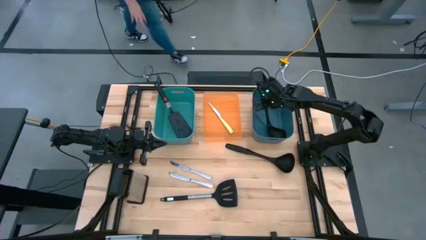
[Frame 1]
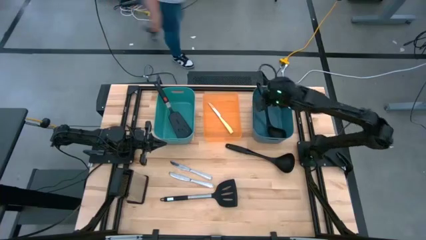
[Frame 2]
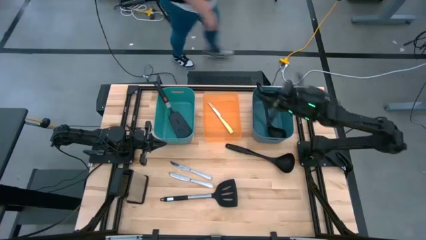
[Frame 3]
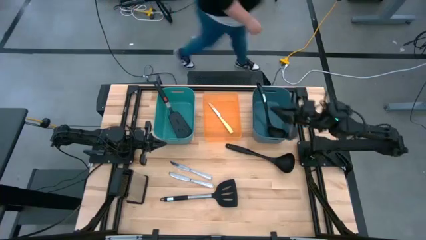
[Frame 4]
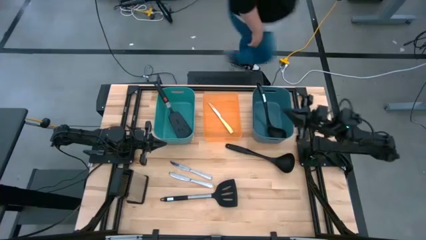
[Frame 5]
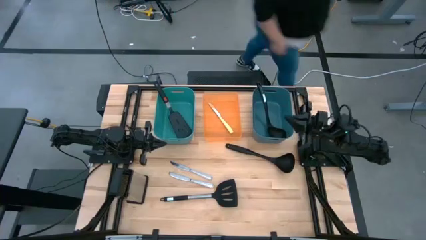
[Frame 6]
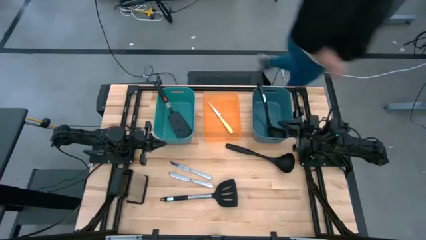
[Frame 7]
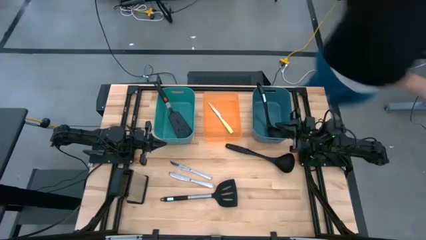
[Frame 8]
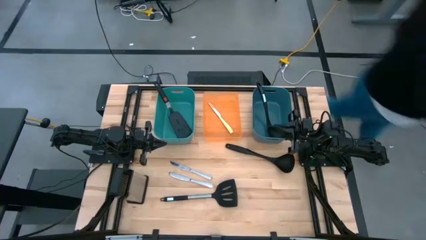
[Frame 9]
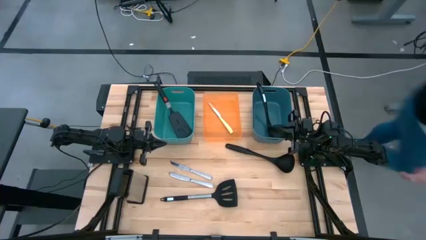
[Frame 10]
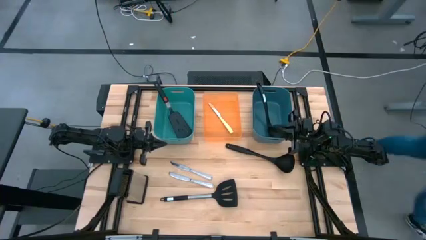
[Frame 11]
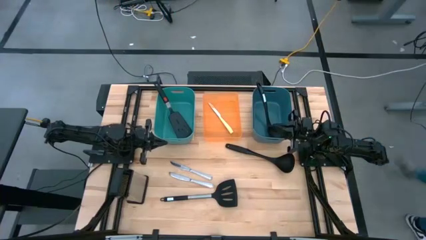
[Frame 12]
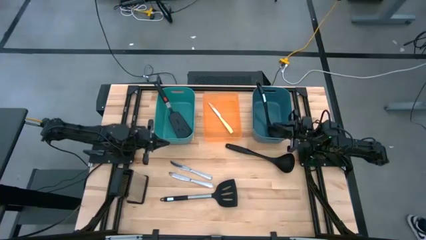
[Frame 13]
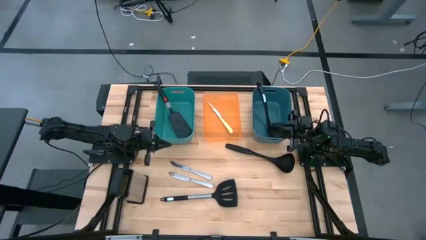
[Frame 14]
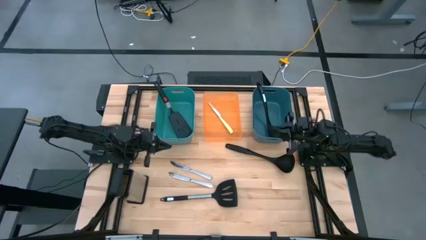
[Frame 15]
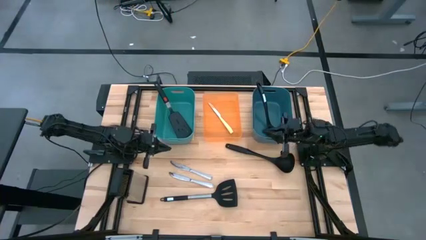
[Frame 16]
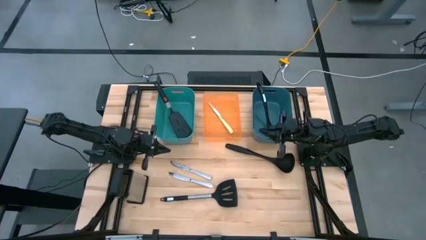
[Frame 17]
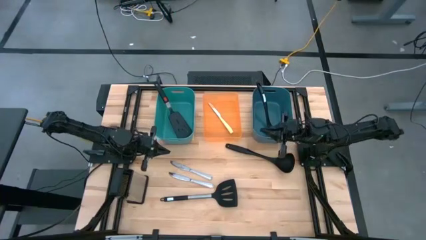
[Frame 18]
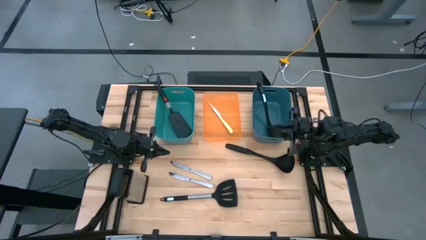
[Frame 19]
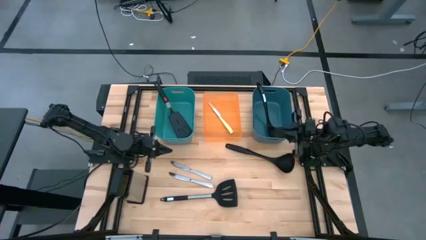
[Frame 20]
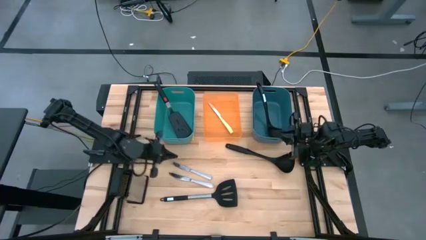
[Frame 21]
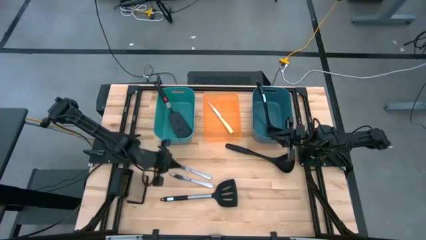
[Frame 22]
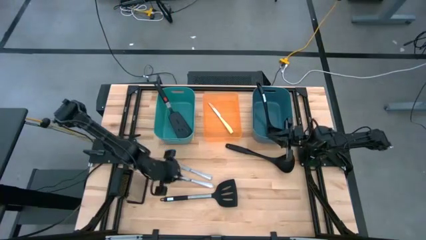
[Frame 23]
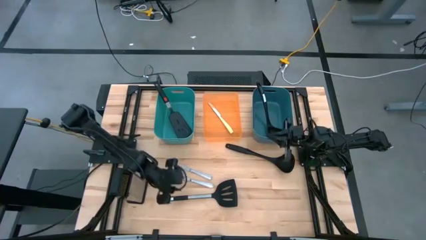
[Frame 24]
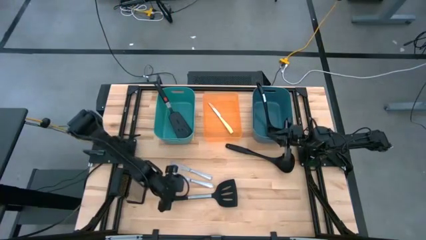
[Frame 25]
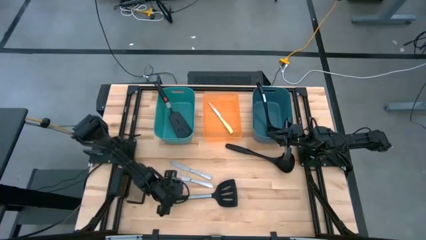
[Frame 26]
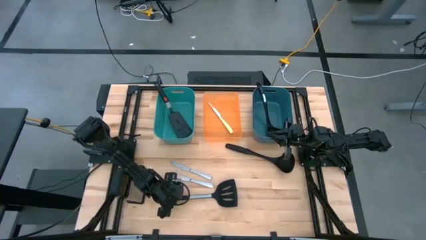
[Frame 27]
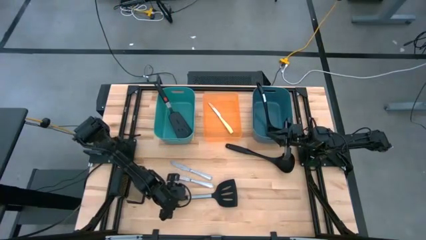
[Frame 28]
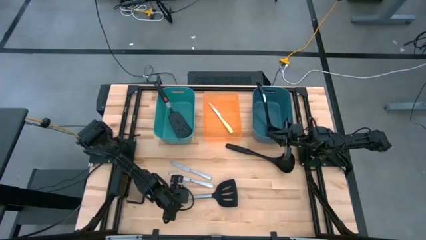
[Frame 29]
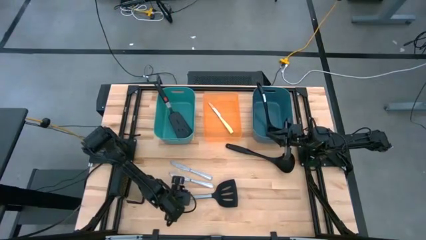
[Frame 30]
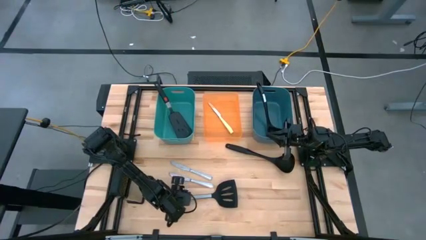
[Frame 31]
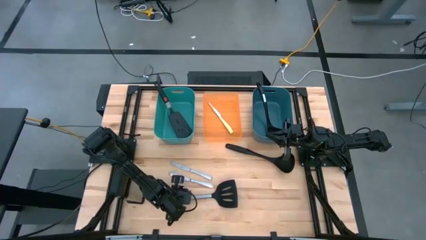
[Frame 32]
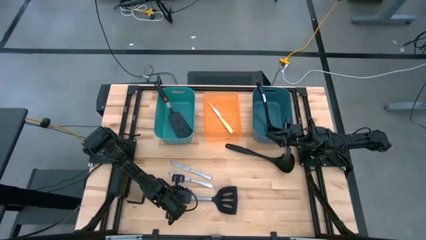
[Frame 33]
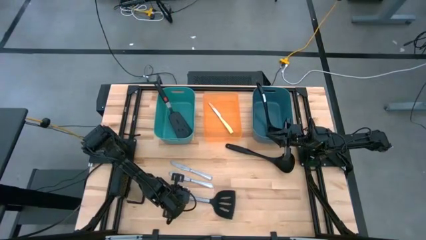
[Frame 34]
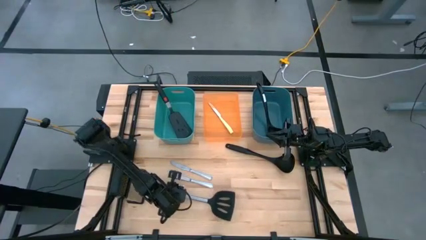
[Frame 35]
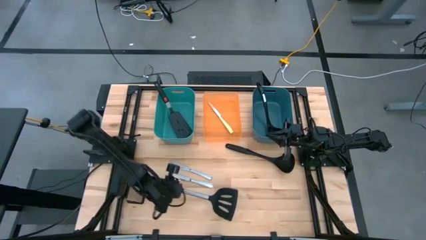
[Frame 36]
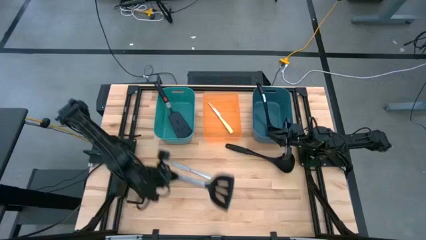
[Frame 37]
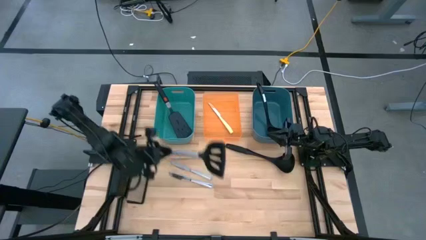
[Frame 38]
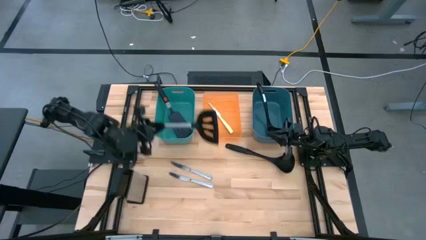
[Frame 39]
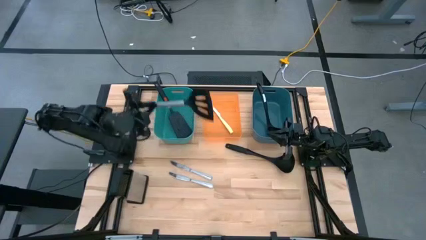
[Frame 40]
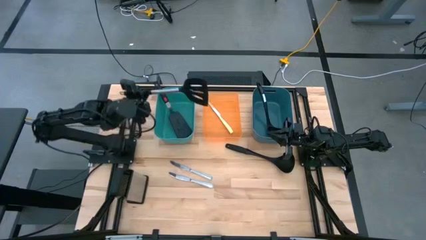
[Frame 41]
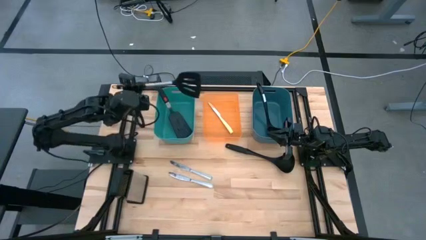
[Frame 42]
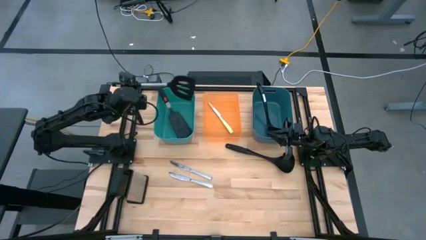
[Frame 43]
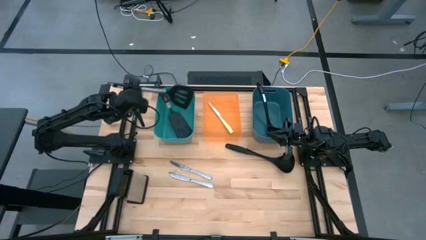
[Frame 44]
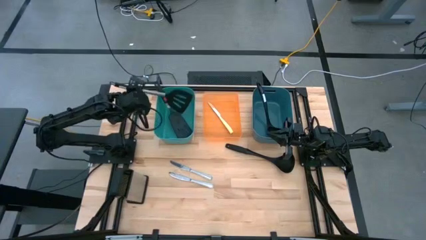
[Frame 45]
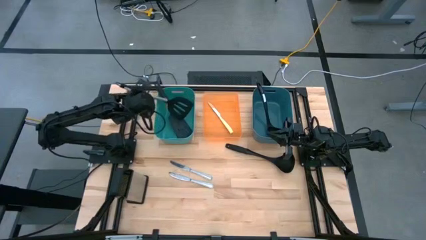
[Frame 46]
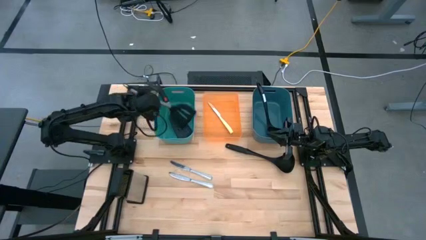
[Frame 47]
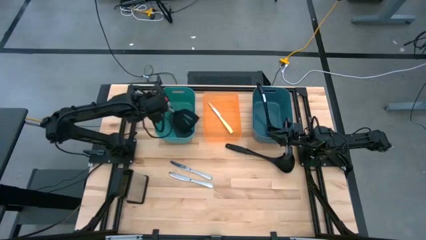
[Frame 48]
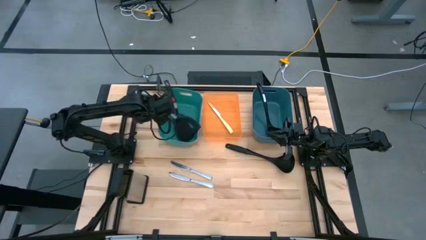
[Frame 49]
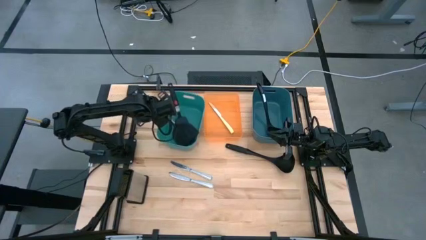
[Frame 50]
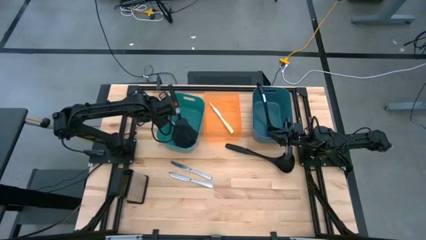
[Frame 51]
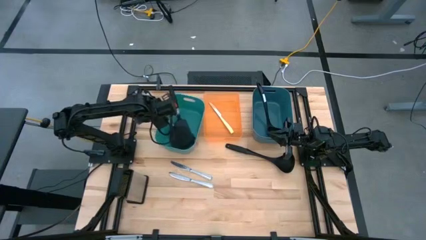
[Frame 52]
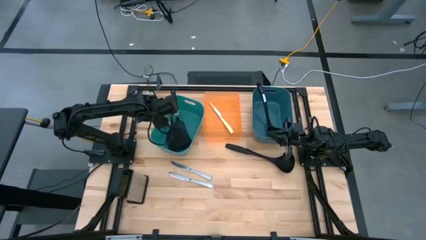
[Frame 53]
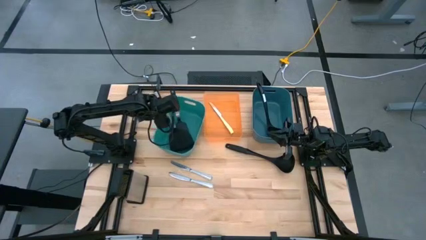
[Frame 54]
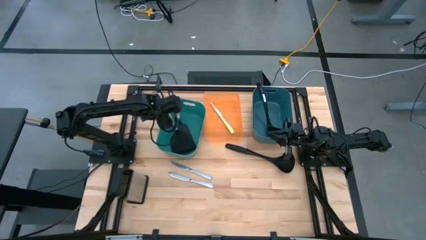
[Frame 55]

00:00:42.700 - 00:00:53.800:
Task: Pick & Place Kitchen Items
Put the black spatula into the green bin

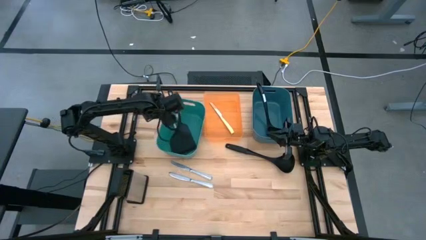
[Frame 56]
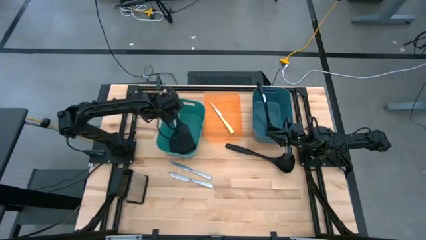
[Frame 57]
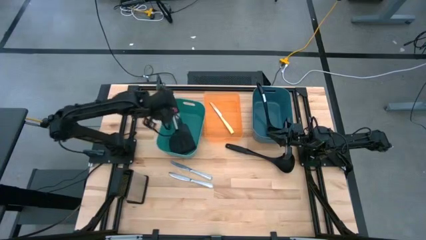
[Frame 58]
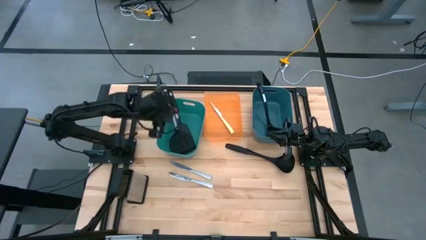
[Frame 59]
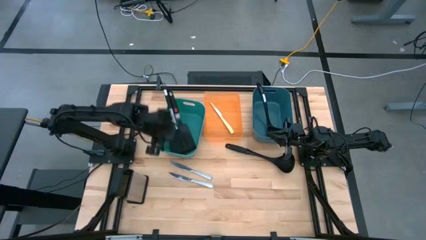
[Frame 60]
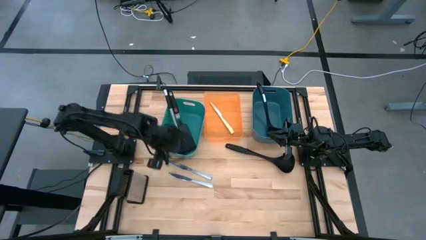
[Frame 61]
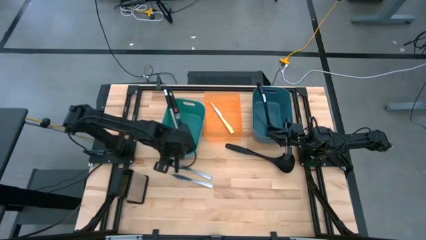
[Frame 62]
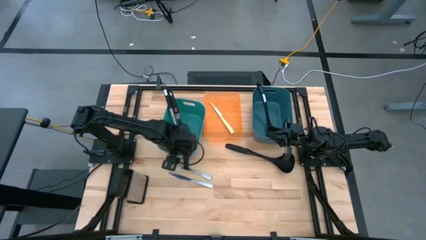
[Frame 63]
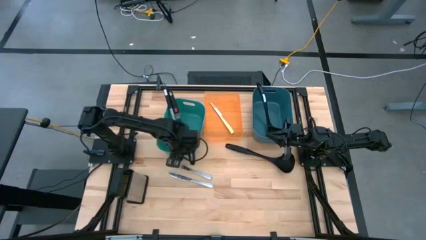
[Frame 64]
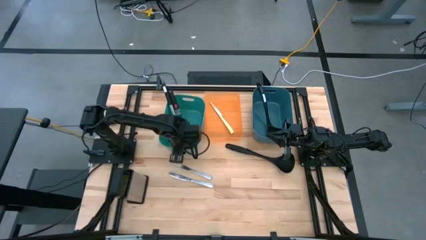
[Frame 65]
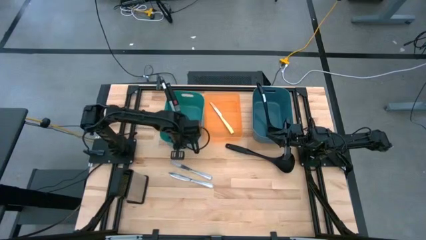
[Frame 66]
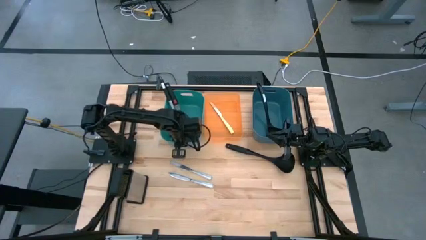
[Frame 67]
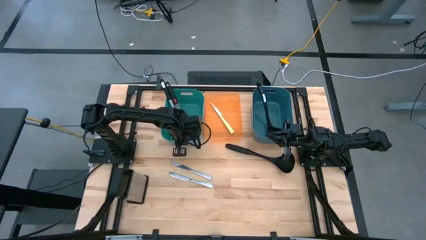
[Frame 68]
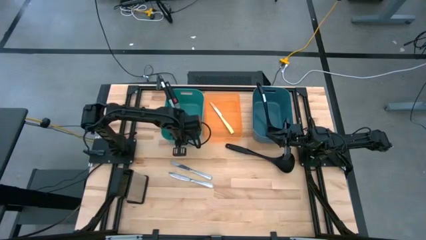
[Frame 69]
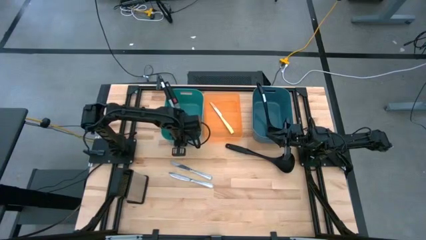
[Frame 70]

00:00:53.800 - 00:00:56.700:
Adjust the green bin

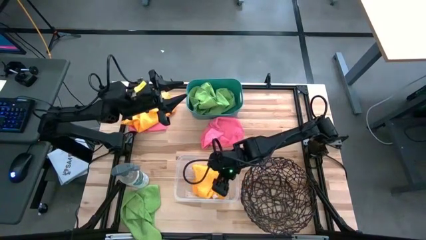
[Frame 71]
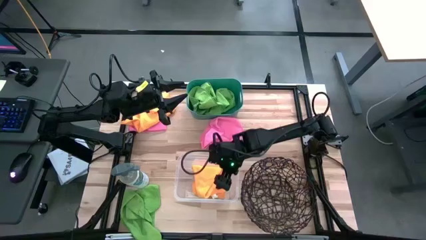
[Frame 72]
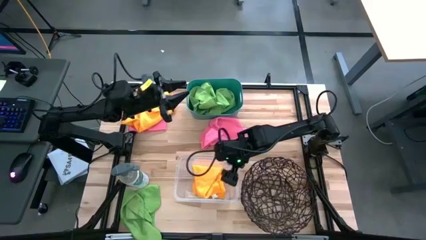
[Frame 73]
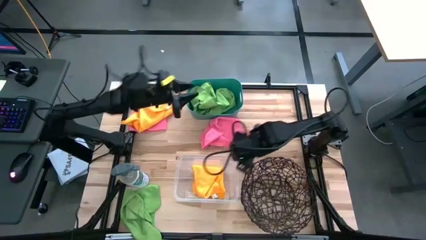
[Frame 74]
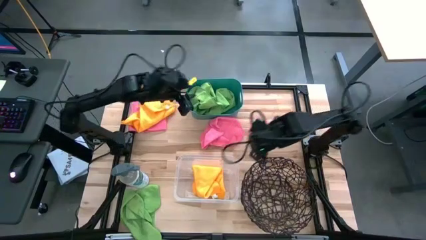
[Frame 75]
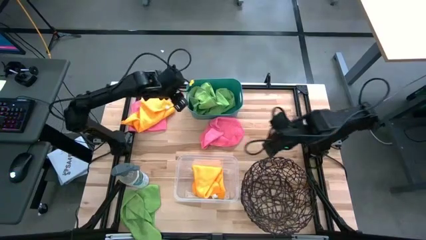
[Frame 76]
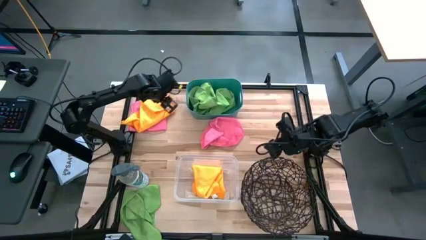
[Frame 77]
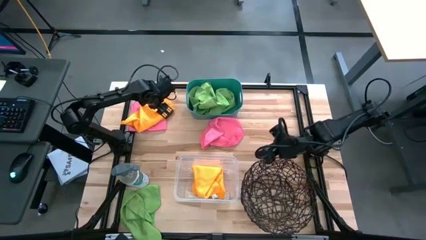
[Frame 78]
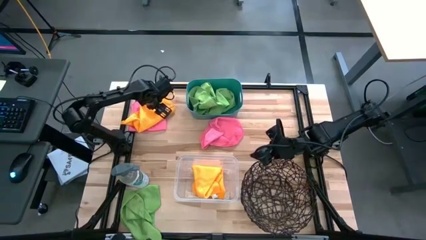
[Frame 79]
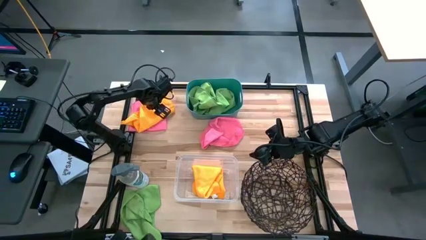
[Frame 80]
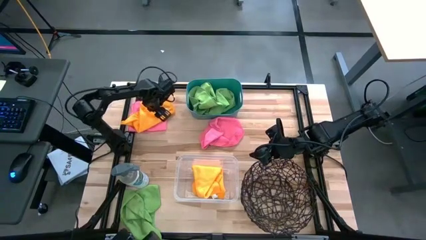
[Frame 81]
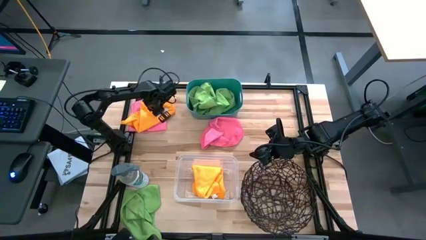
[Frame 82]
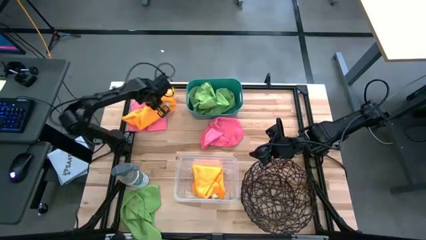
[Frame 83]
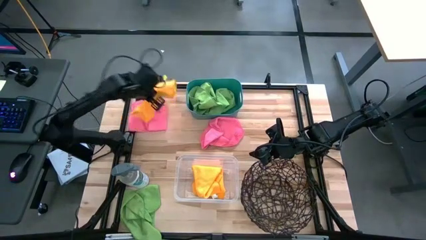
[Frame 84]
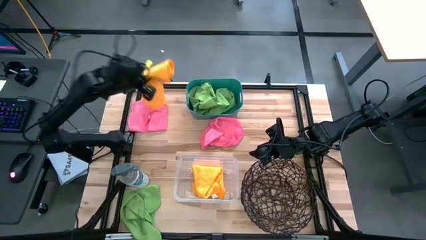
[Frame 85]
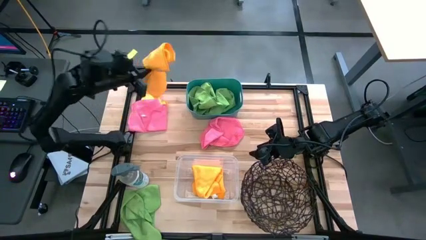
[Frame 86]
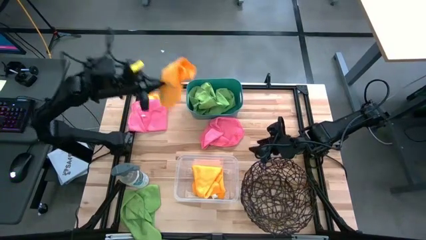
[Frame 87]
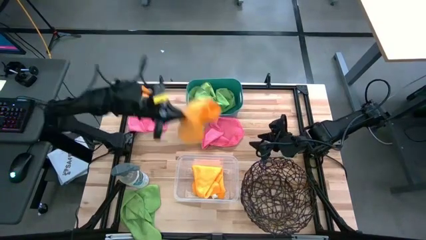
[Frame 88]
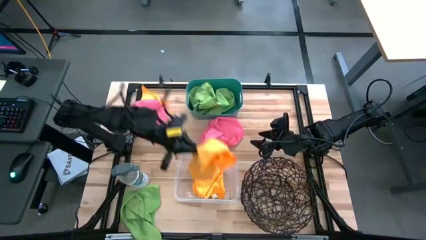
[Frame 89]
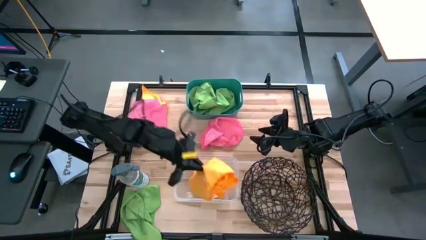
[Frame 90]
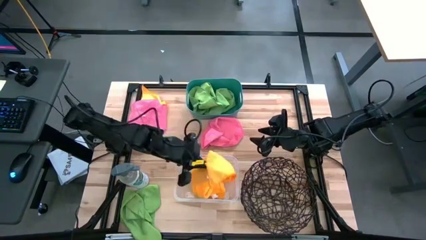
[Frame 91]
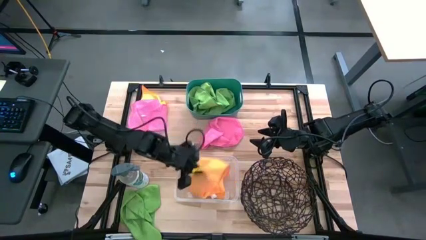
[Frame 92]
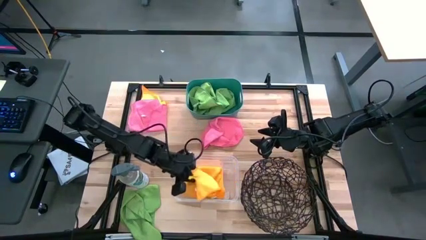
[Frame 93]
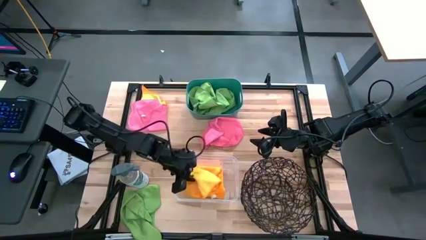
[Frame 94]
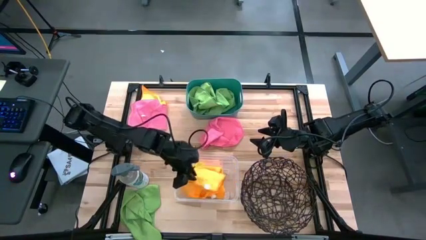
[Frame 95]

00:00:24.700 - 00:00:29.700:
Task: Sort microfiber towel by color & place in baskets
Put the light orange microfiber cloth into the transparent bin
